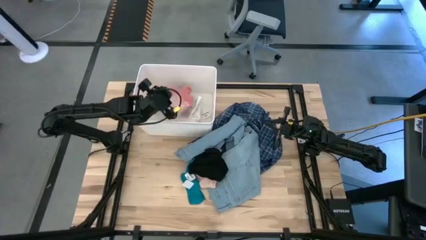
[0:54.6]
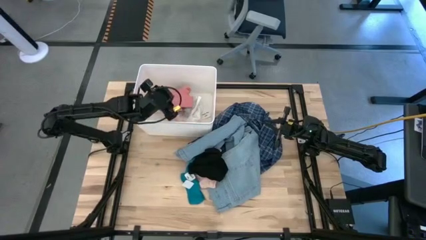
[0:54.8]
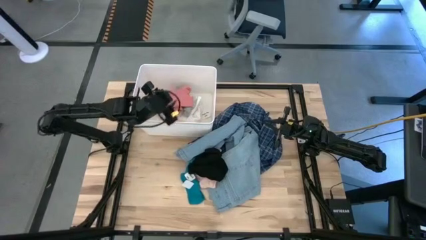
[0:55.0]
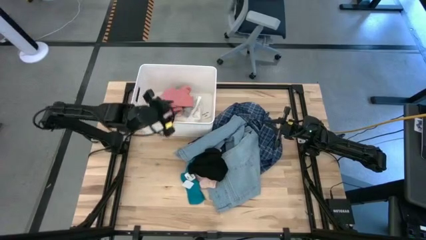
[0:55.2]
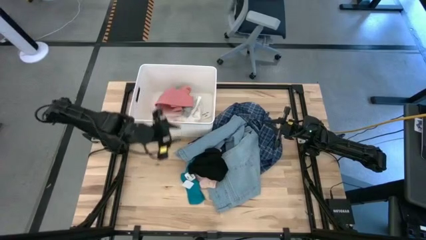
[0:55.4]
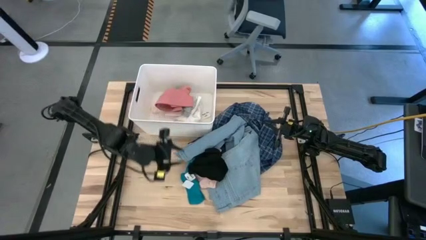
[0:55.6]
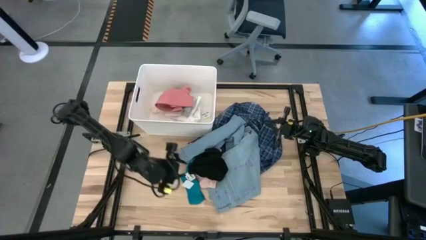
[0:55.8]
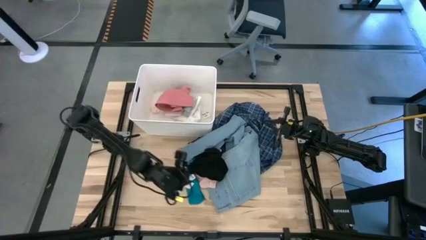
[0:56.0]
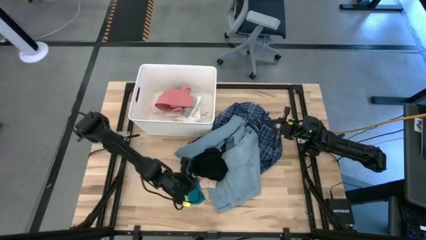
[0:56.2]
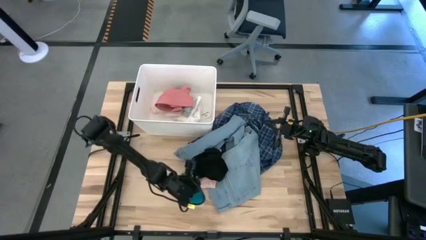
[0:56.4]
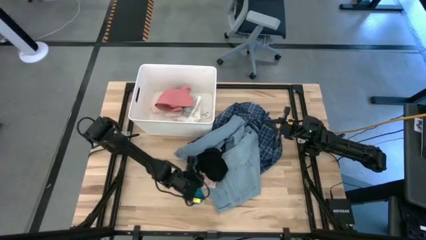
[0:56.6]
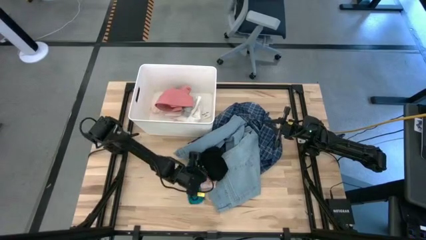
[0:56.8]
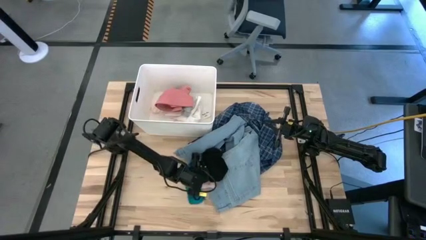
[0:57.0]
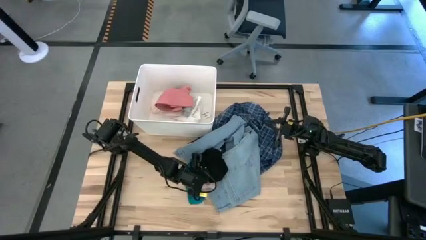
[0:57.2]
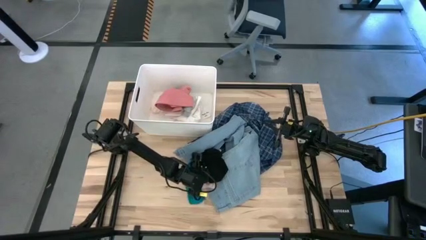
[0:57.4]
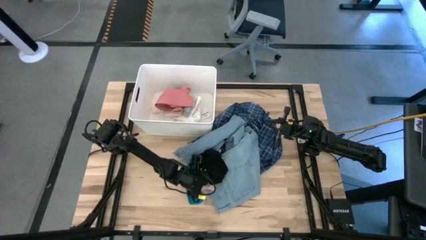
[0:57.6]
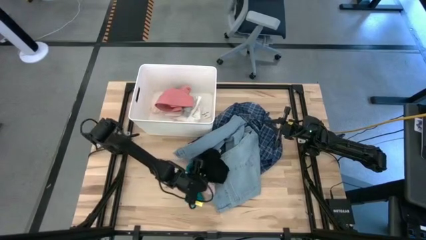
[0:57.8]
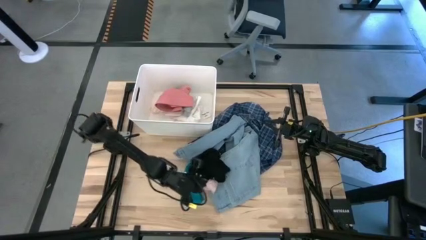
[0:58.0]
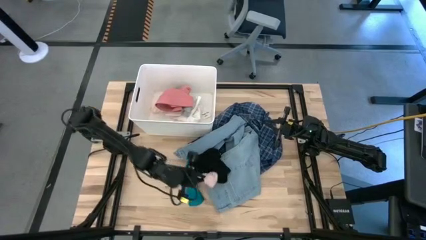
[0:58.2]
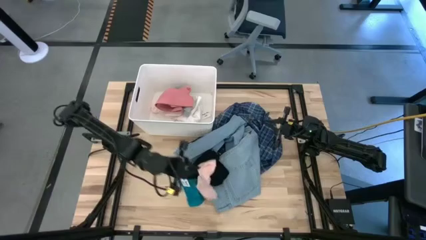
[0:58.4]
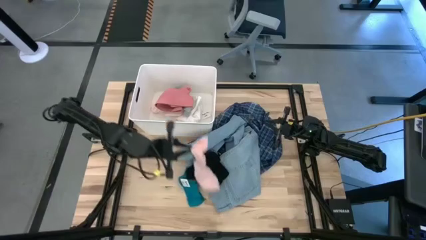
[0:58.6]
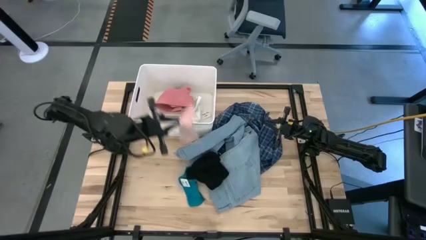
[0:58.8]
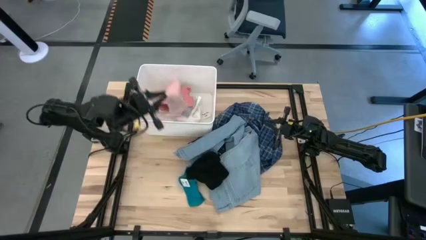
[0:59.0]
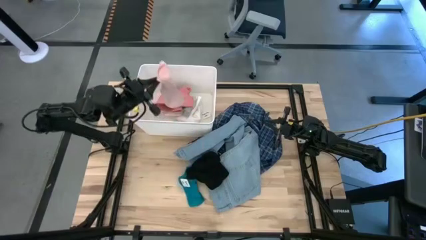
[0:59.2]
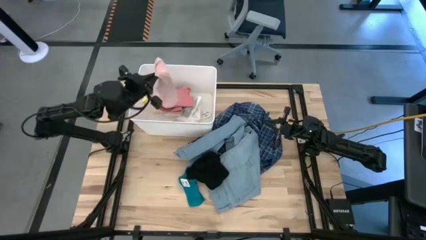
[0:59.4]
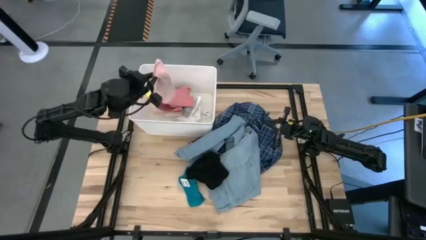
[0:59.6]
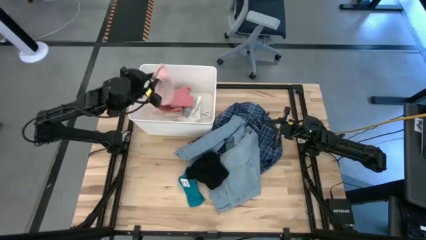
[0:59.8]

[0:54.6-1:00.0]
Task: Sort clothes
Put the light pink sock into the white laundry bin

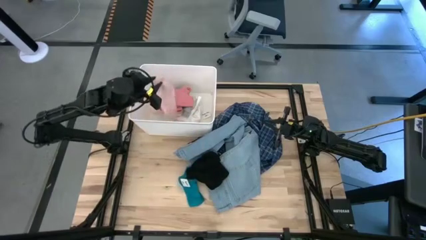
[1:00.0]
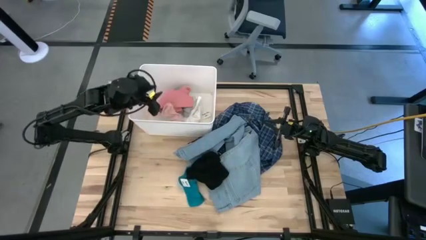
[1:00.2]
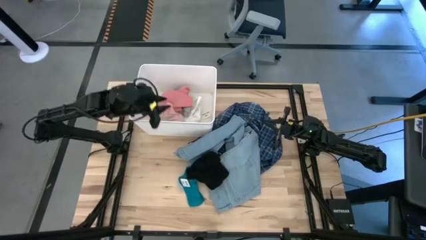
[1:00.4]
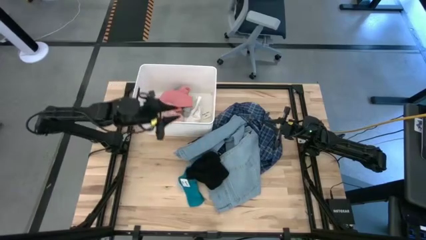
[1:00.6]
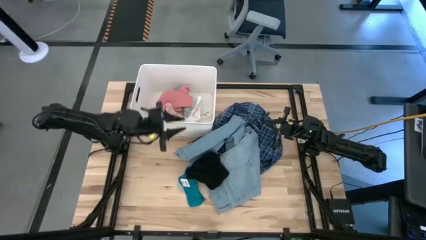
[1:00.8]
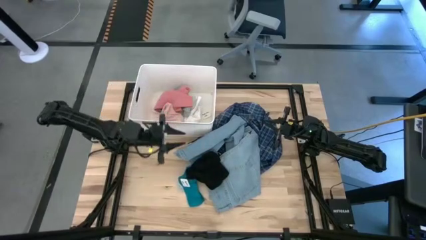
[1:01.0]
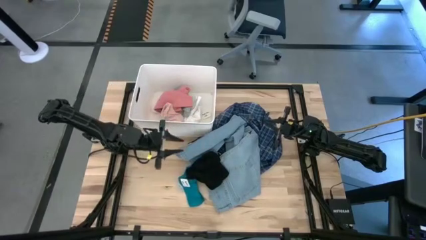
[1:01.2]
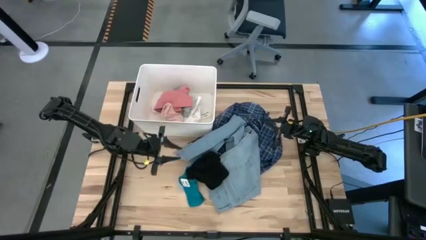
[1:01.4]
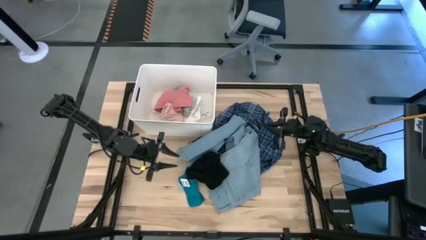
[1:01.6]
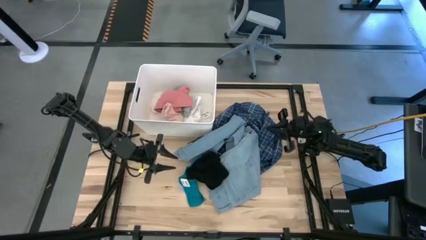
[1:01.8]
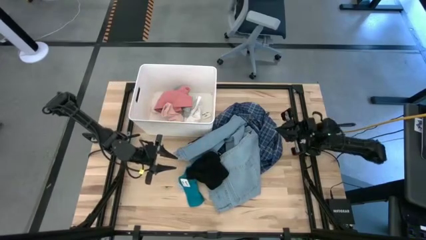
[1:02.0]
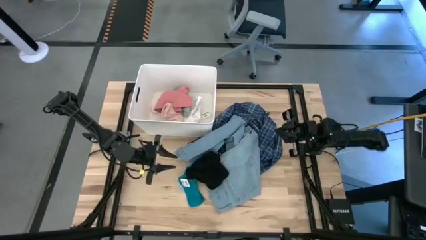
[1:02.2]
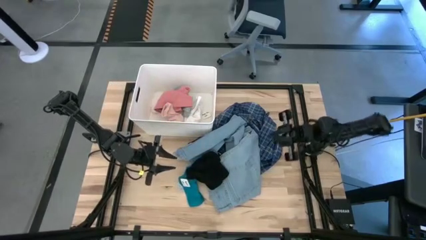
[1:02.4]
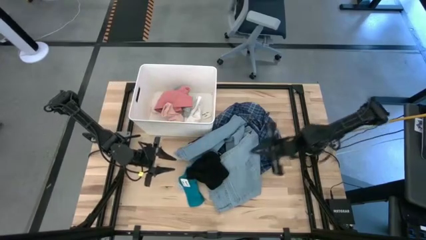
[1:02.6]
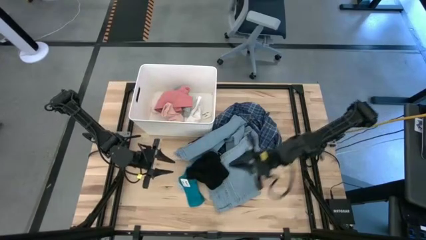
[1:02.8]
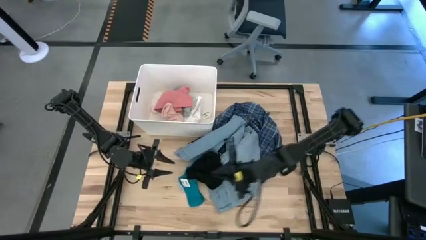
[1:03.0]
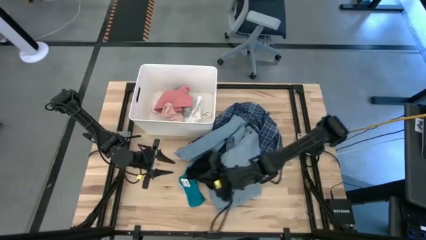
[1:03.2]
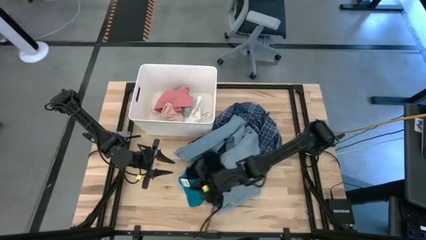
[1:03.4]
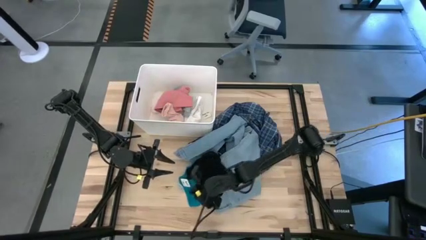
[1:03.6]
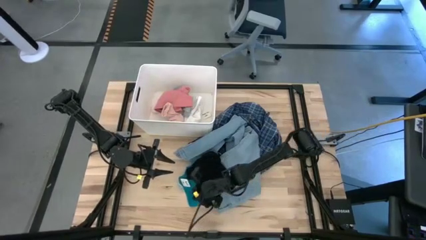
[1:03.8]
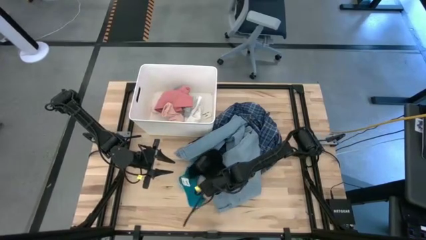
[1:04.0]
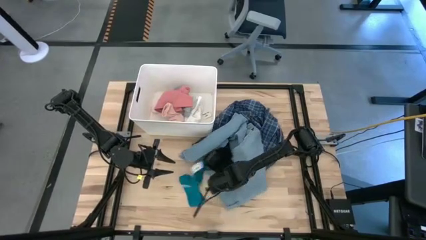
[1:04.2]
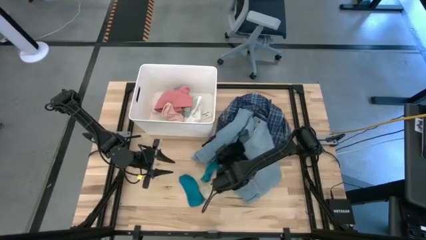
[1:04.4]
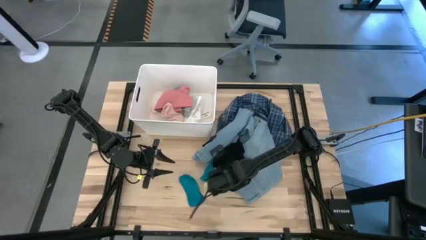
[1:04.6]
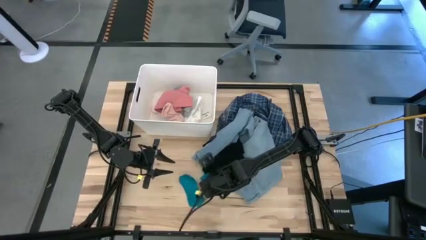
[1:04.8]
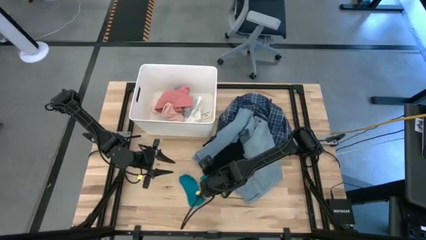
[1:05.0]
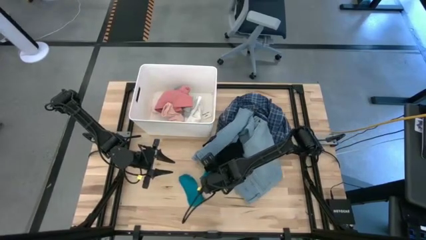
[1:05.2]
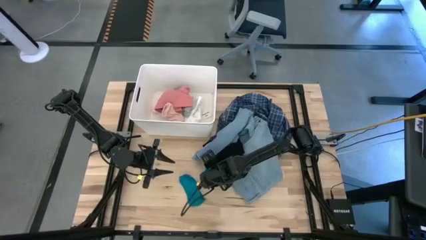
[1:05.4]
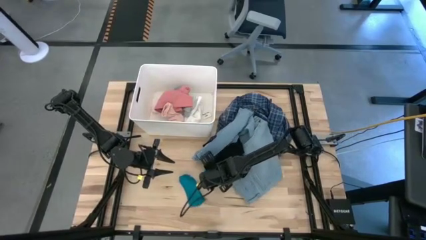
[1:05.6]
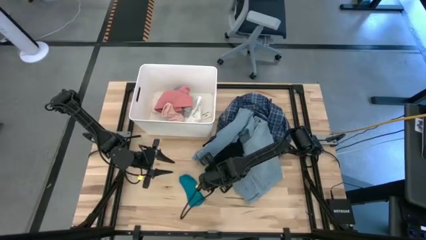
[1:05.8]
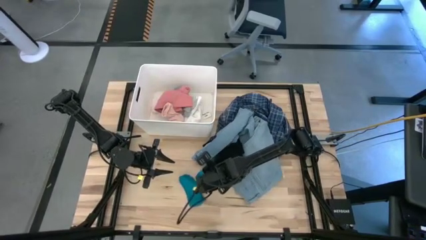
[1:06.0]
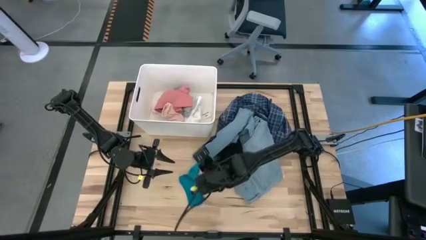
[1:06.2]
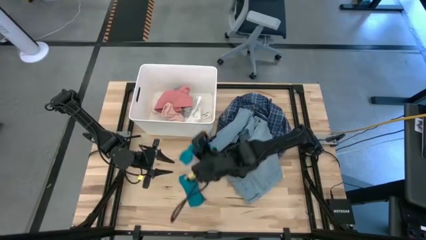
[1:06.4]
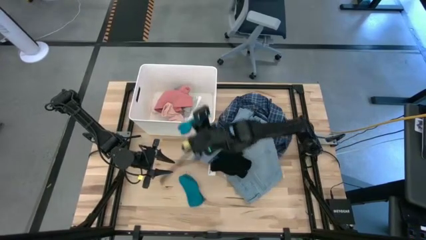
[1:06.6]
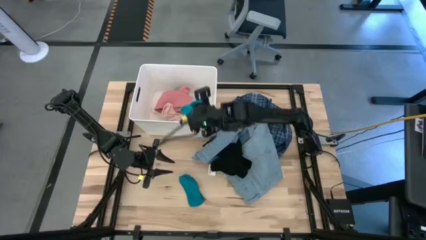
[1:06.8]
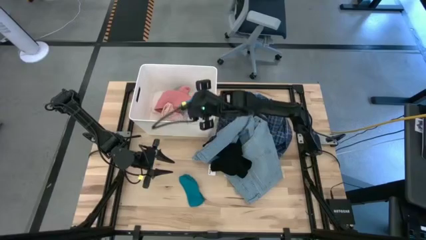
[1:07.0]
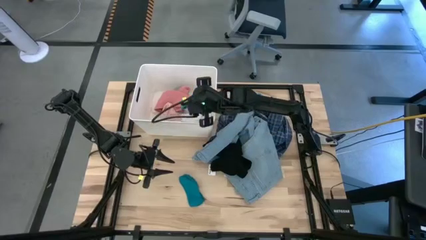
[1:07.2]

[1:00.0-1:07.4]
Put the blue sock into the white laundry bin

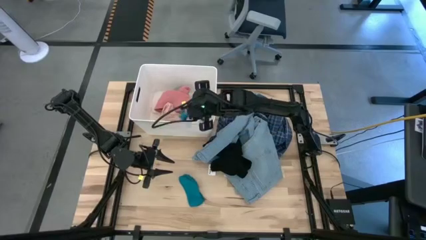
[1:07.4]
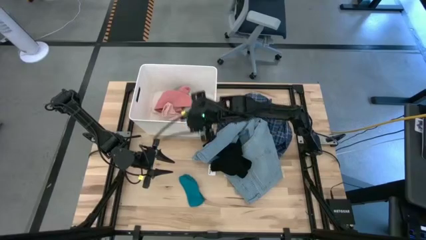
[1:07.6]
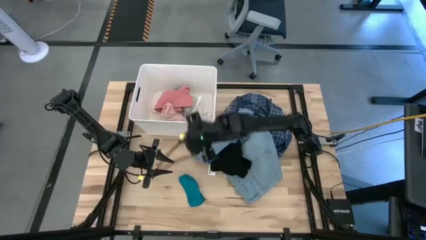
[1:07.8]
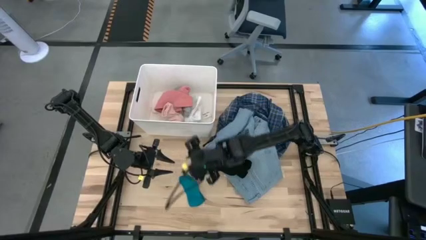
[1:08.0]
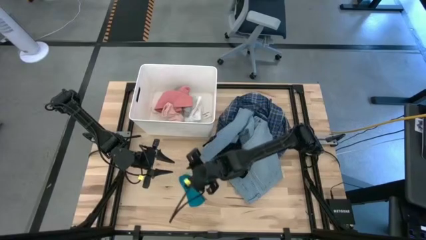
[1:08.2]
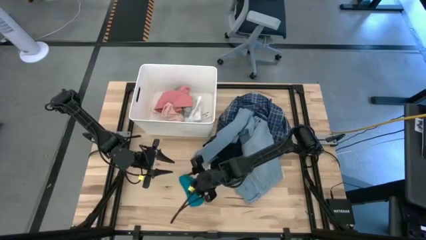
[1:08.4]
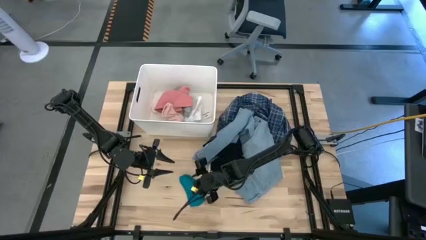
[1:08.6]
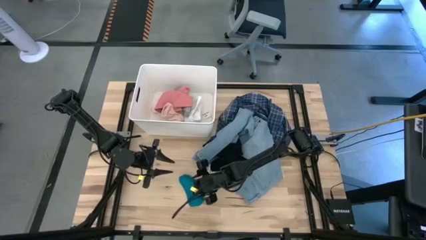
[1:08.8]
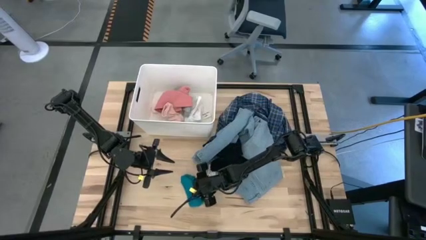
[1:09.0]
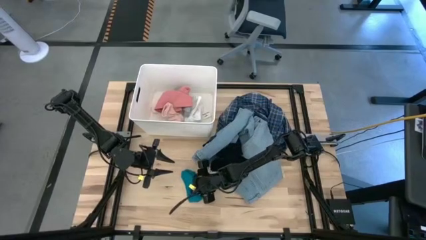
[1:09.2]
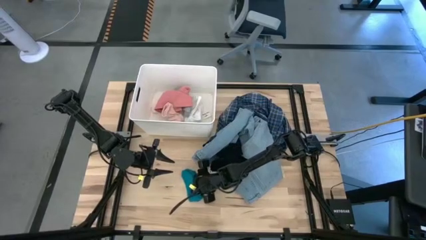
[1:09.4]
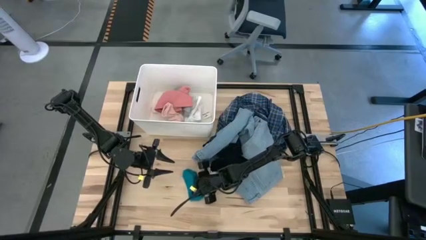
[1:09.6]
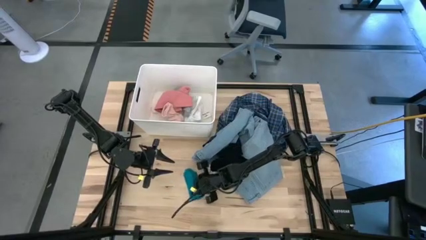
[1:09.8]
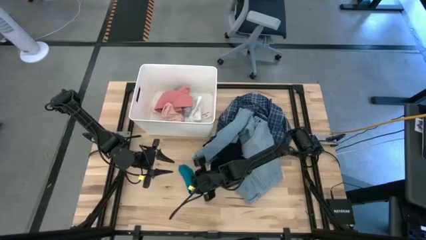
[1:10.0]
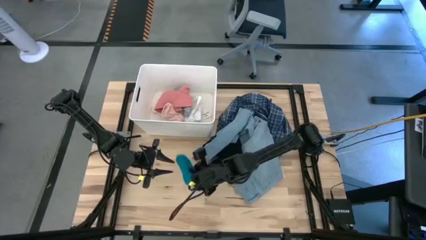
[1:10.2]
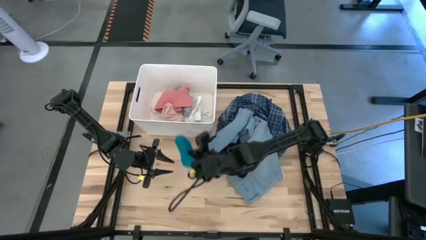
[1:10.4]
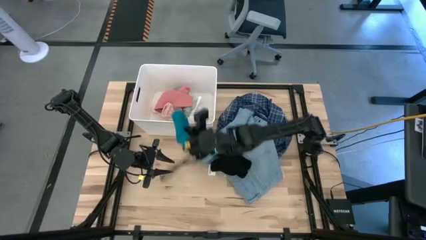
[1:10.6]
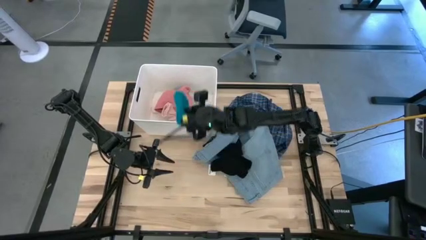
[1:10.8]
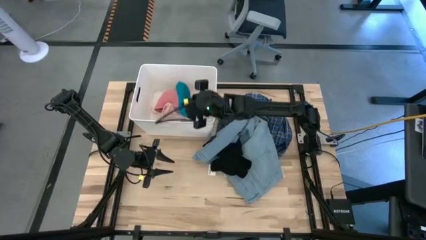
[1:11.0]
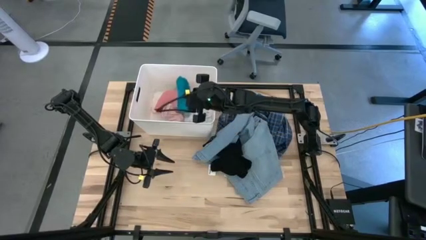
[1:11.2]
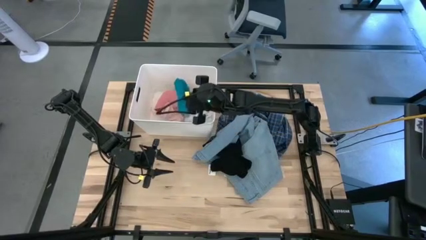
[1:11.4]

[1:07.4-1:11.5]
Put the blue sock into the white laundry bin
